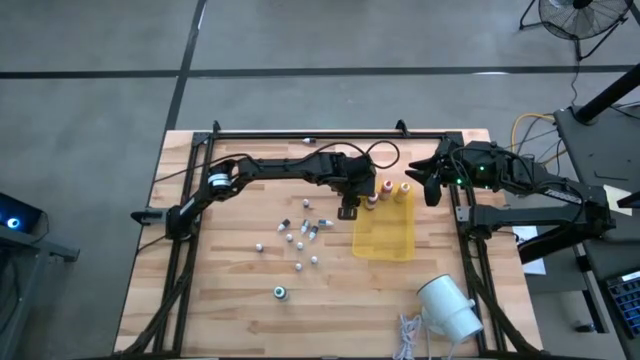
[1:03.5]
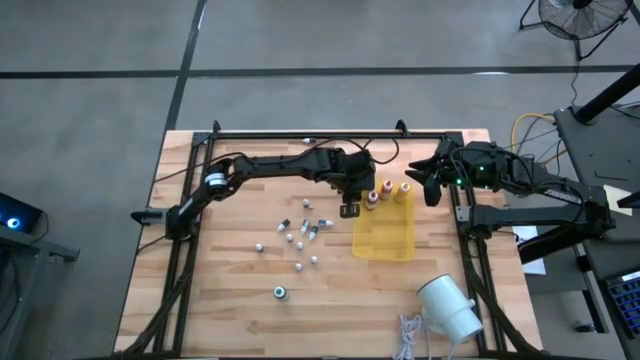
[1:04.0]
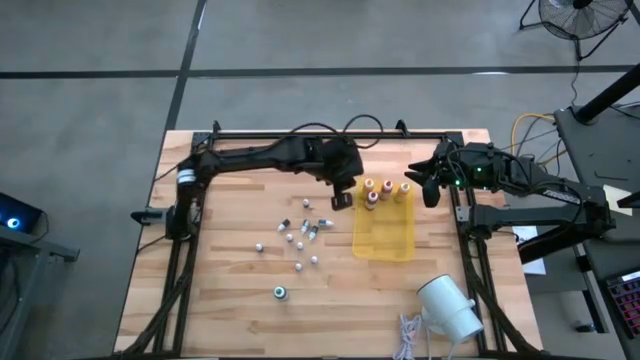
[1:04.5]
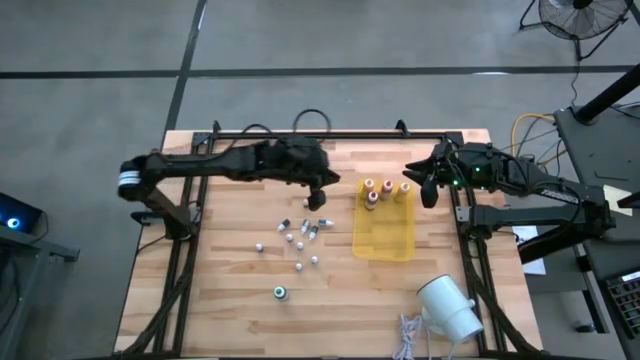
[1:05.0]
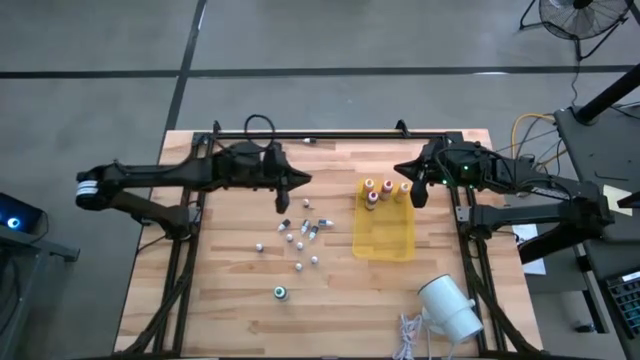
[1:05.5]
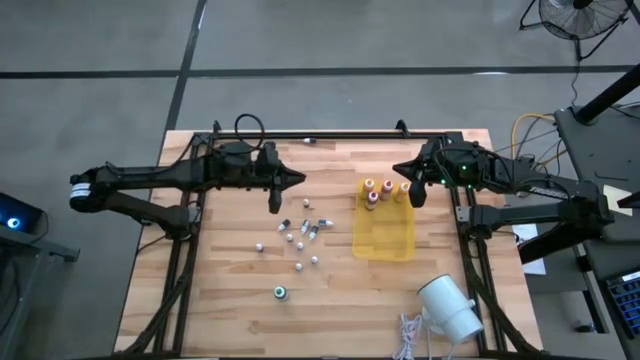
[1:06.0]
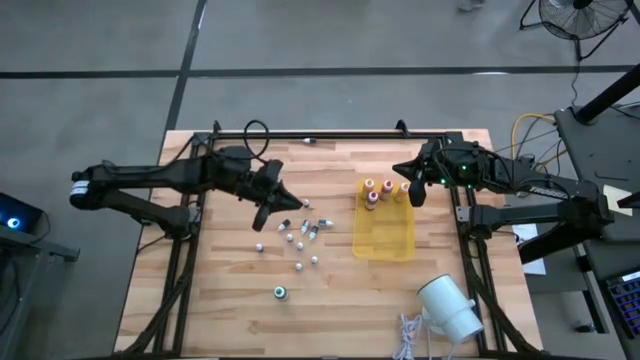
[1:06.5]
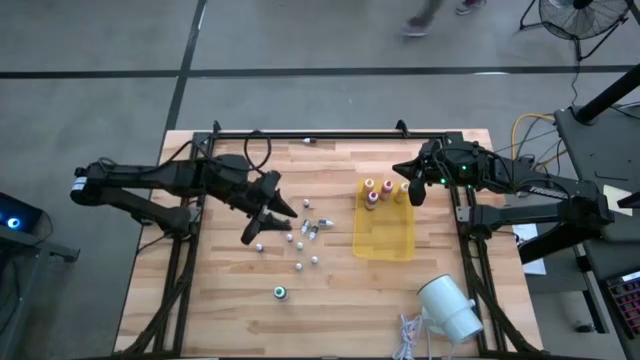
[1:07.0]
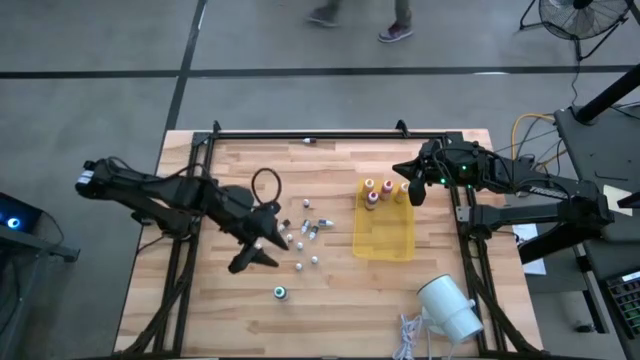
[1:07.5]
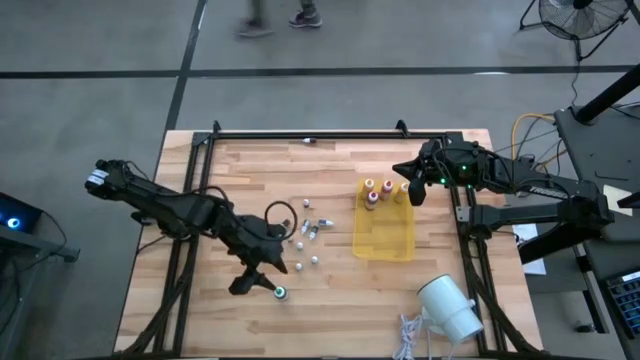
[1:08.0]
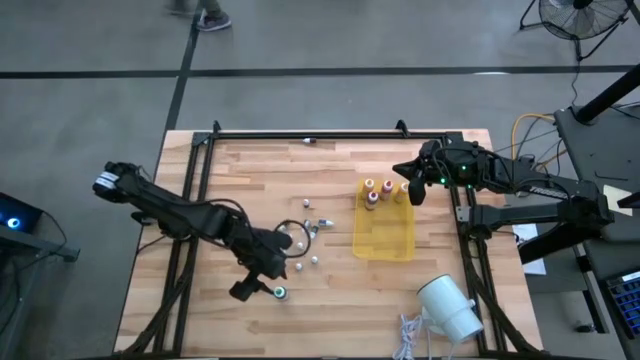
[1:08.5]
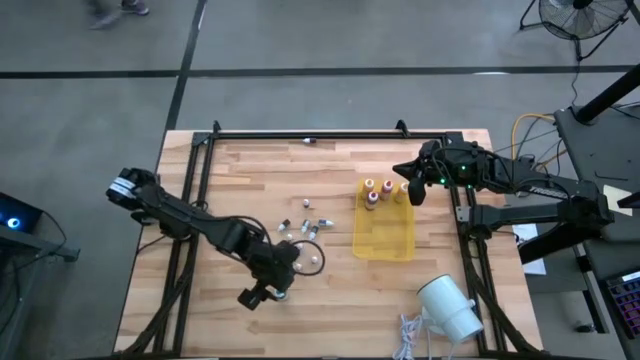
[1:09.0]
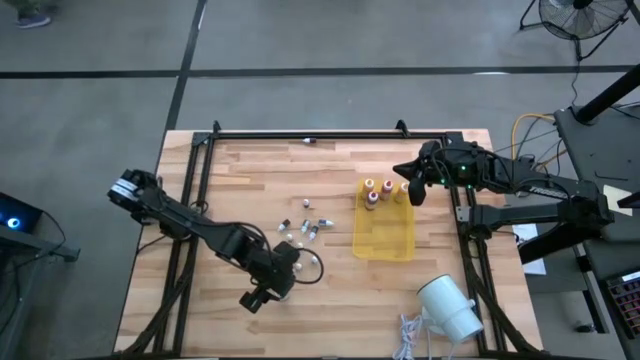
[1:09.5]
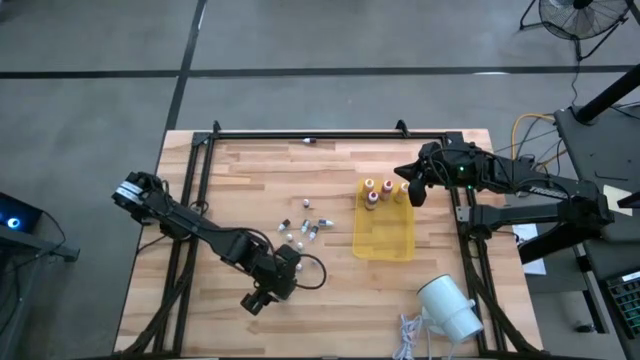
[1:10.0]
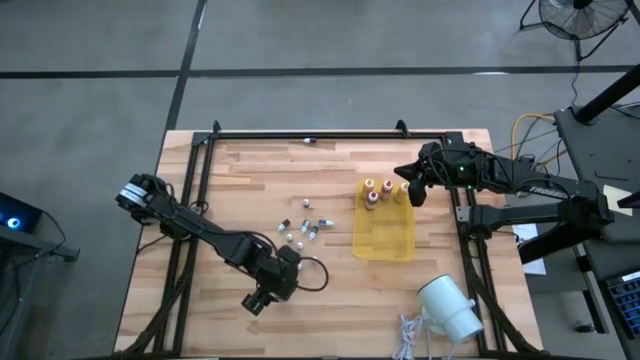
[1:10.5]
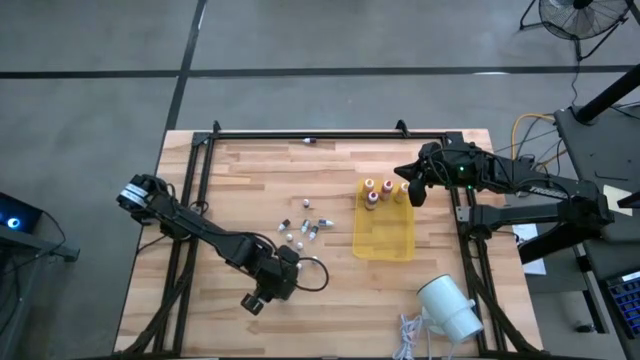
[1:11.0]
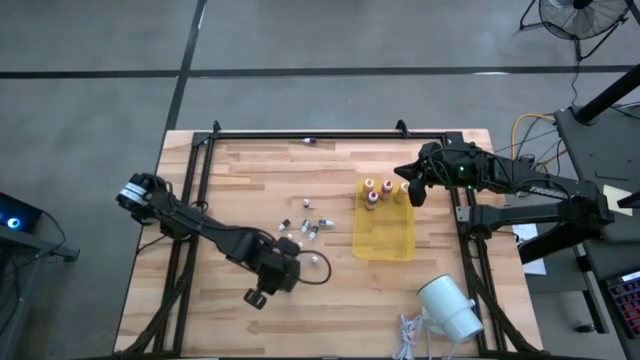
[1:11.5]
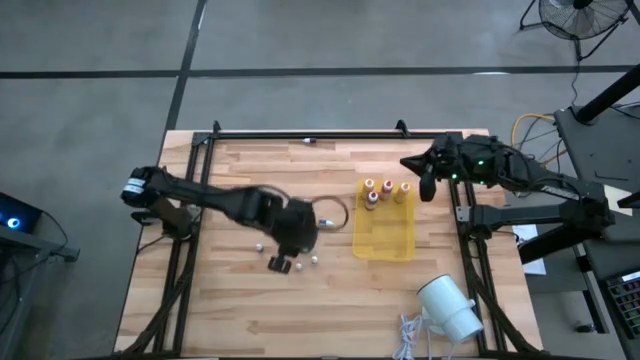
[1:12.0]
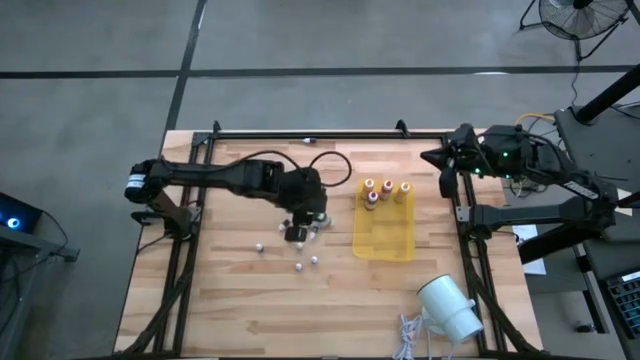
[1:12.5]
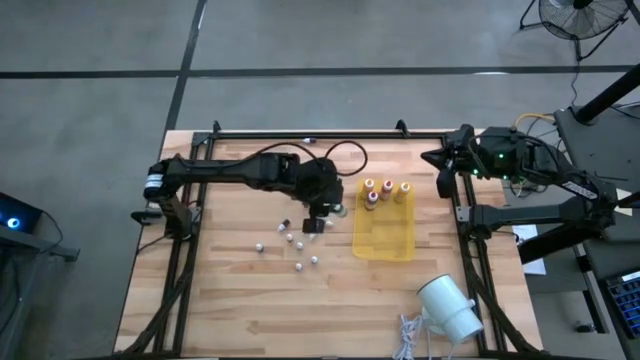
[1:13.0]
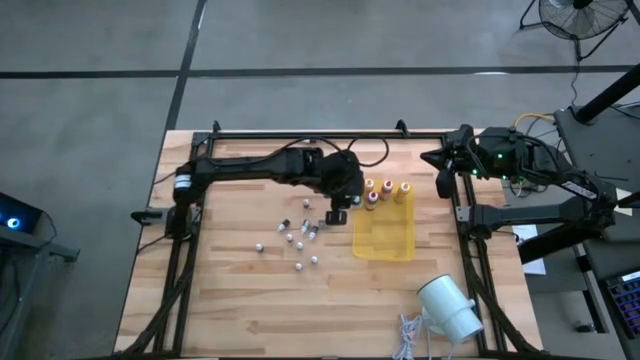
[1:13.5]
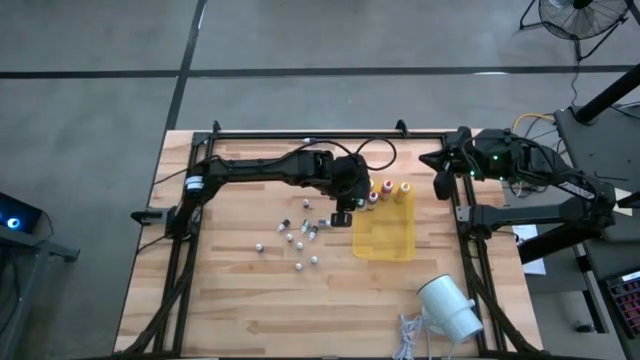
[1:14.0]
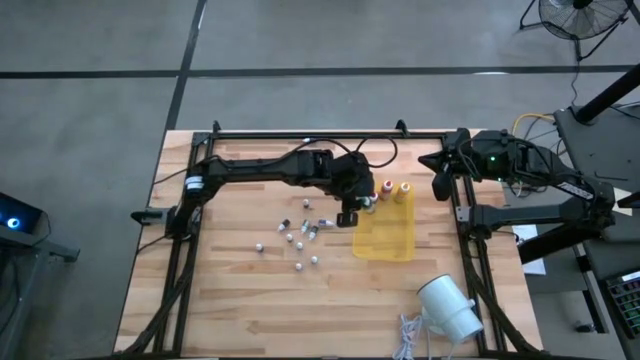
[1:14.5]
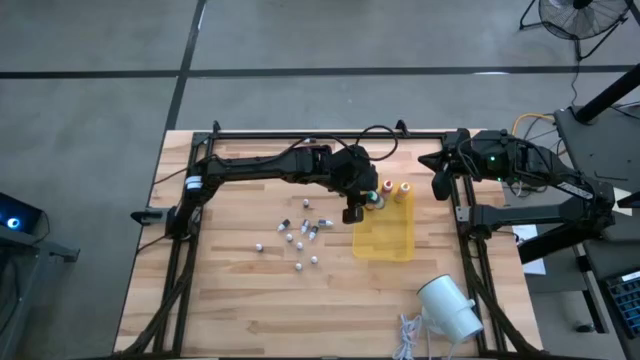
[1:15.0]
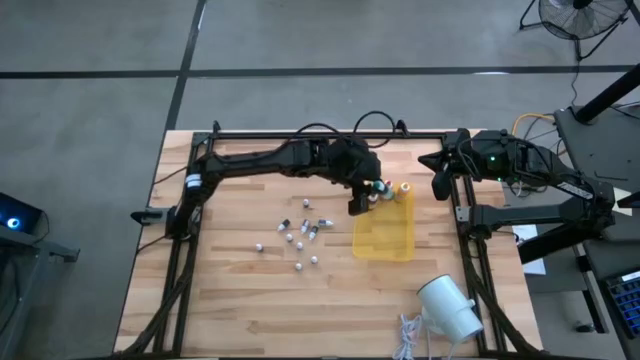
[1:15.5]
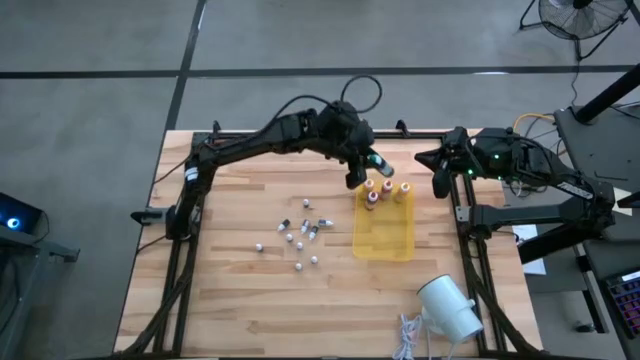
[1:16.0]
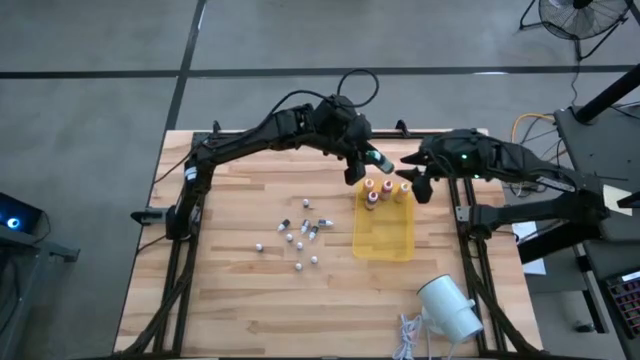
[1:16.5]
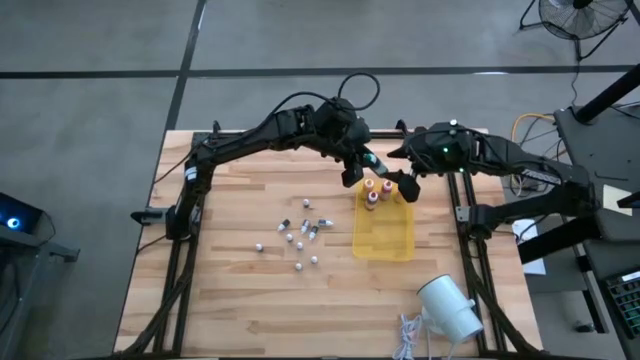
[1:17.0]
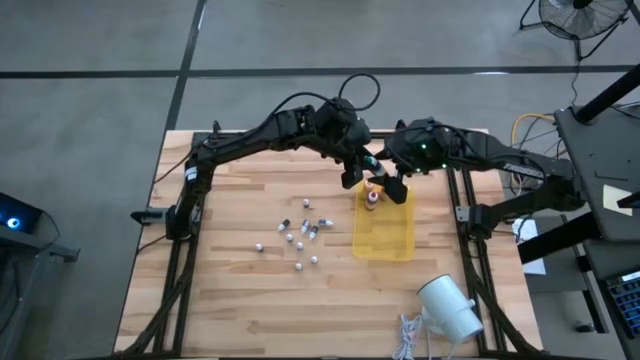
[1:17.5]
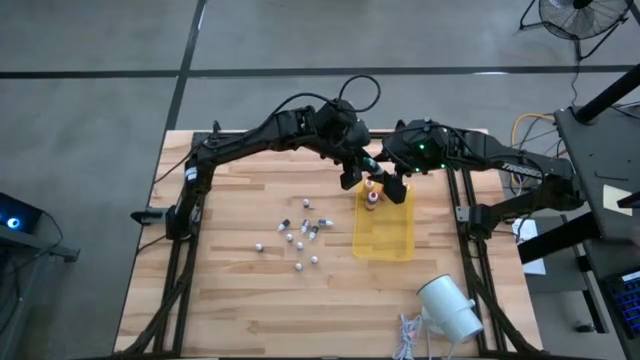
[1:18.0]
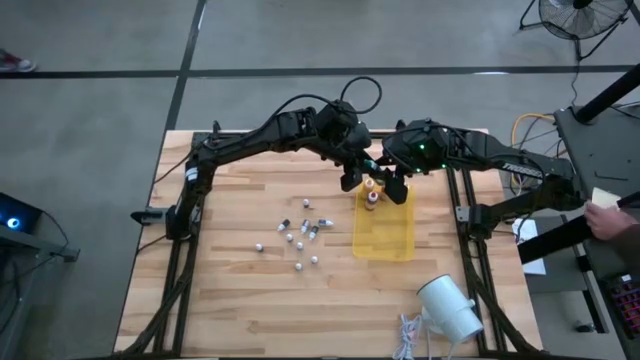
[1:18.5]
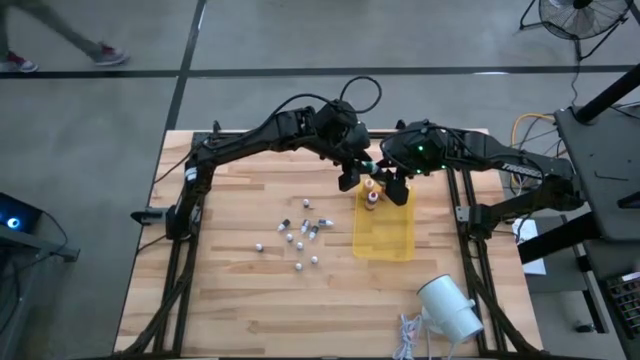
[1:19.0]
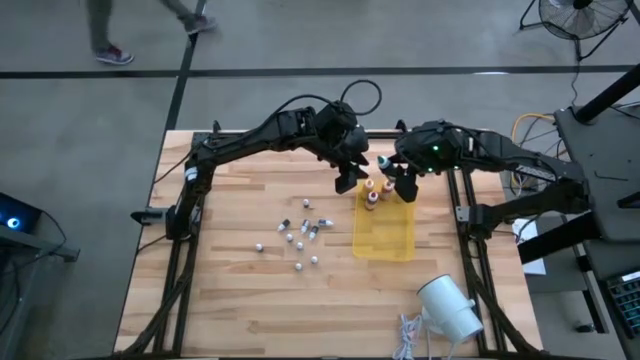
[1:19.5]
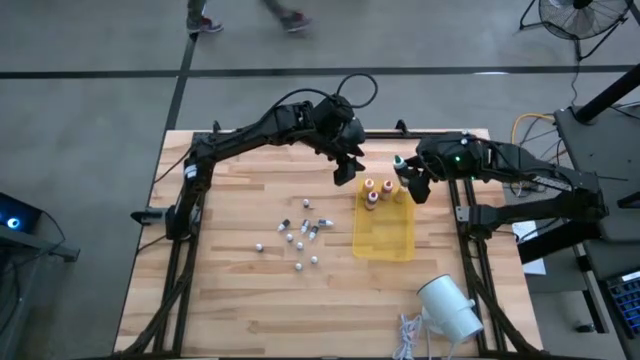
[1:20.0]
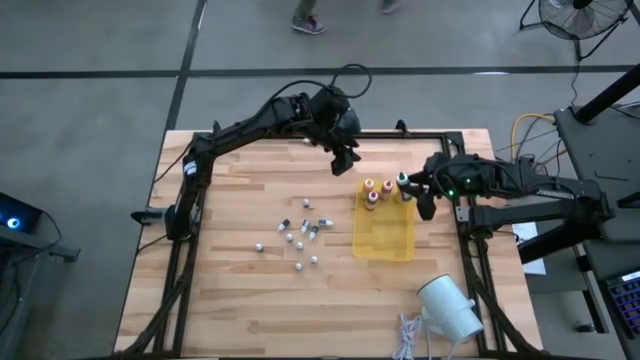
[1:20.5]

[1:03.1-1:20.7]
Task: Pick & Place food coloring
Put the big green food coloring bottle into the yellow bin
